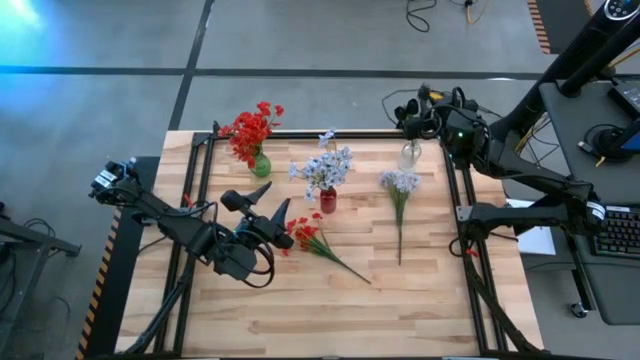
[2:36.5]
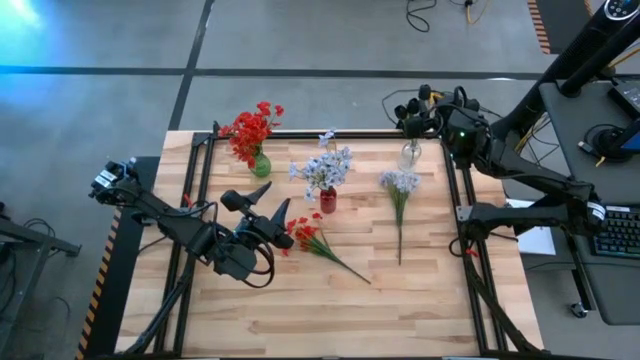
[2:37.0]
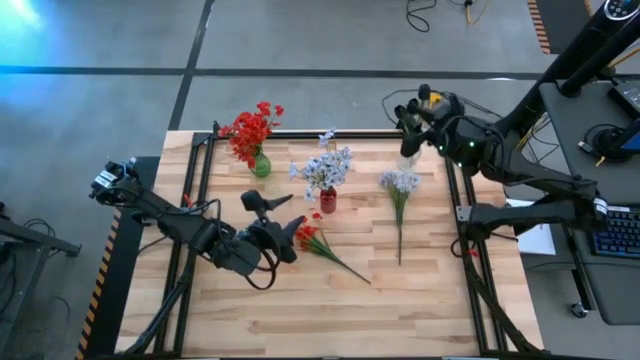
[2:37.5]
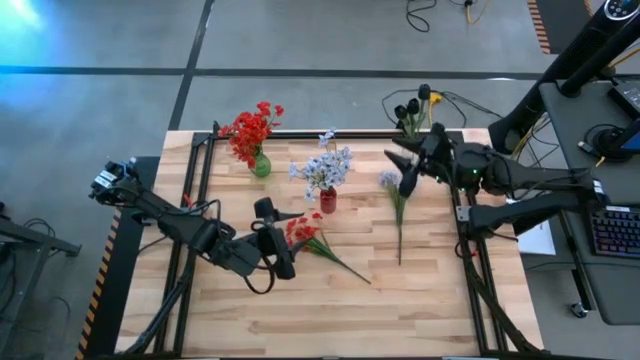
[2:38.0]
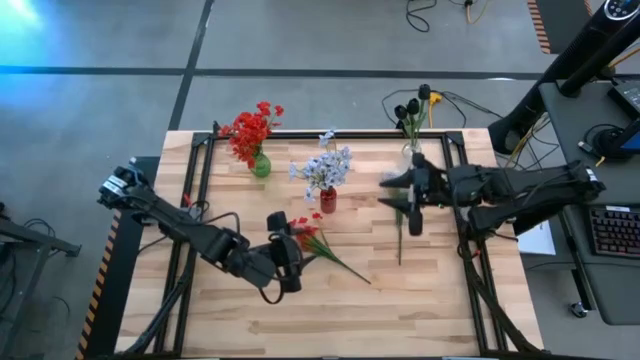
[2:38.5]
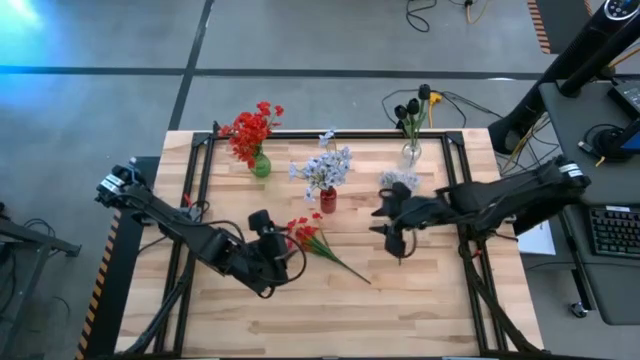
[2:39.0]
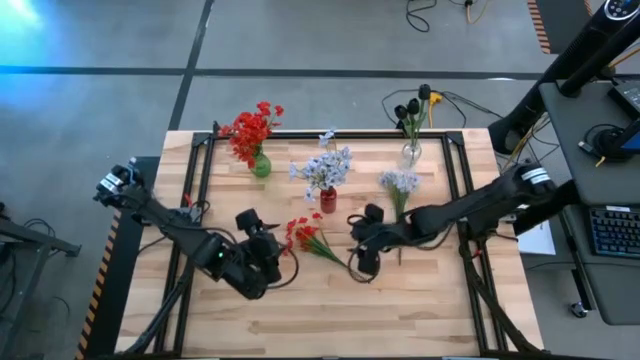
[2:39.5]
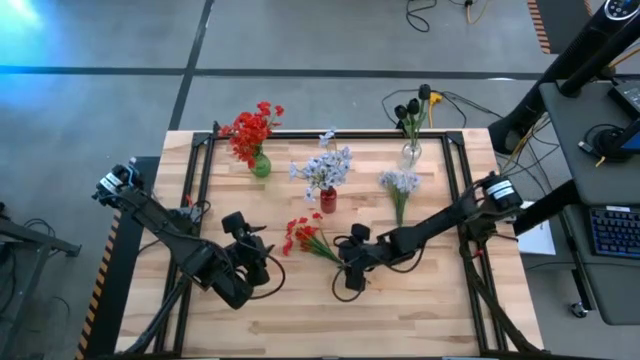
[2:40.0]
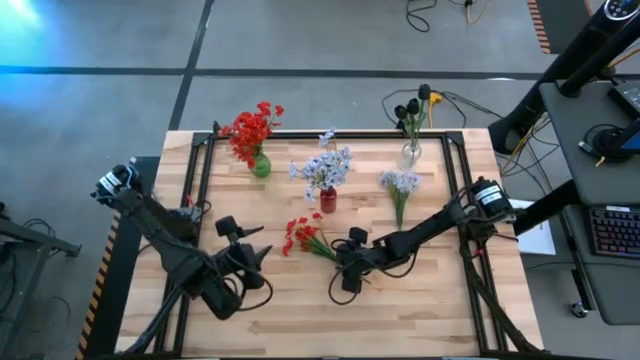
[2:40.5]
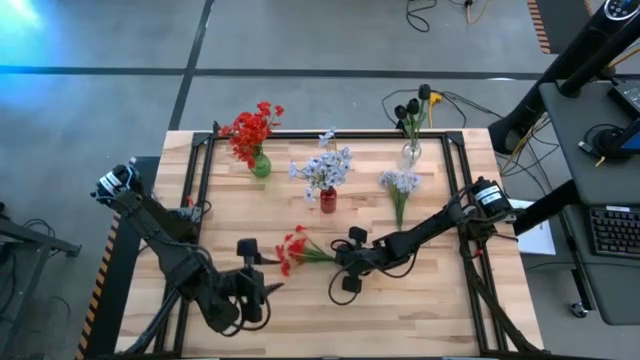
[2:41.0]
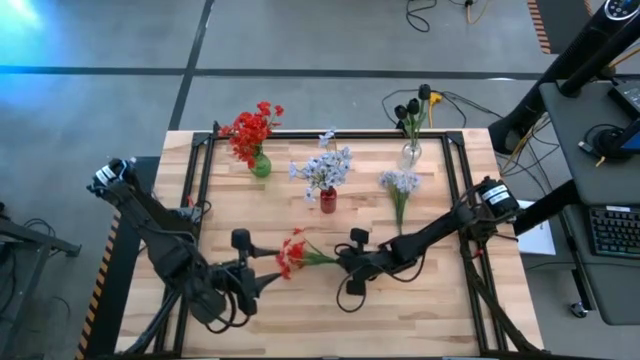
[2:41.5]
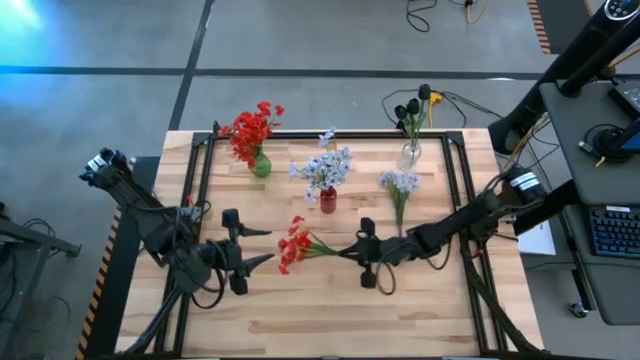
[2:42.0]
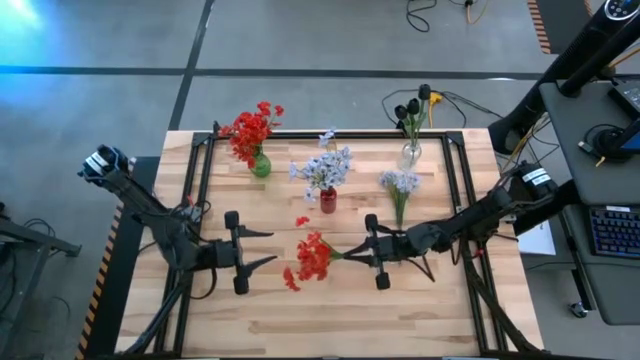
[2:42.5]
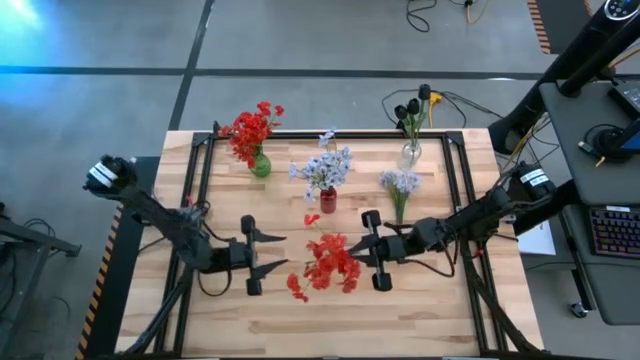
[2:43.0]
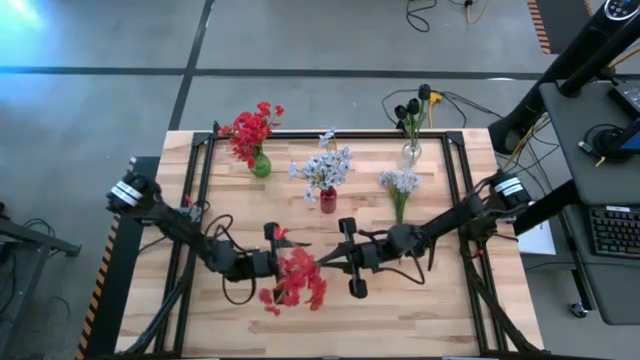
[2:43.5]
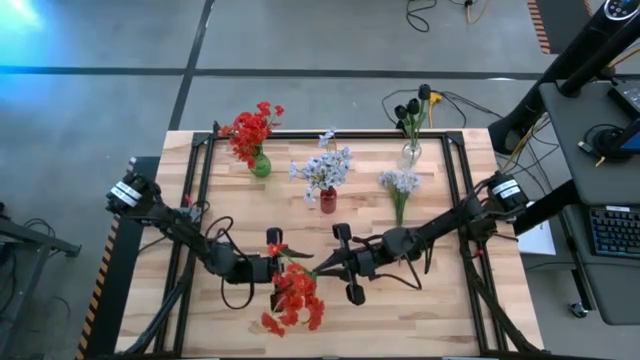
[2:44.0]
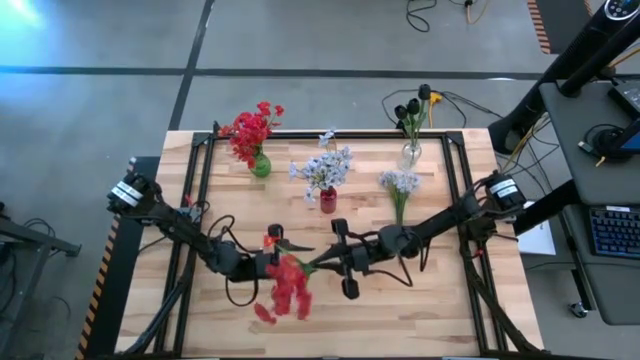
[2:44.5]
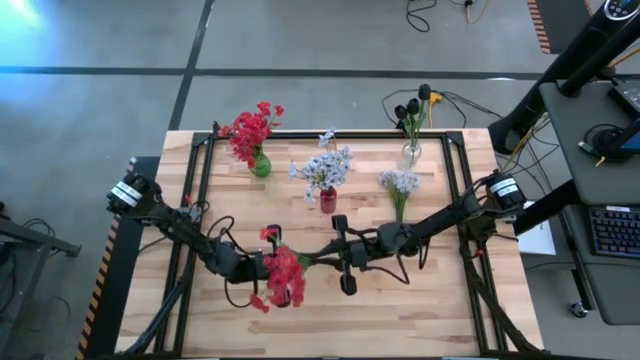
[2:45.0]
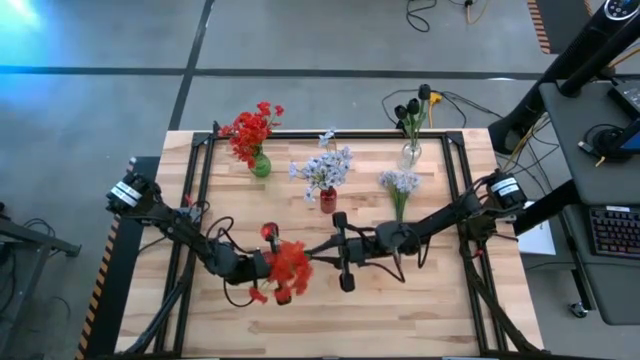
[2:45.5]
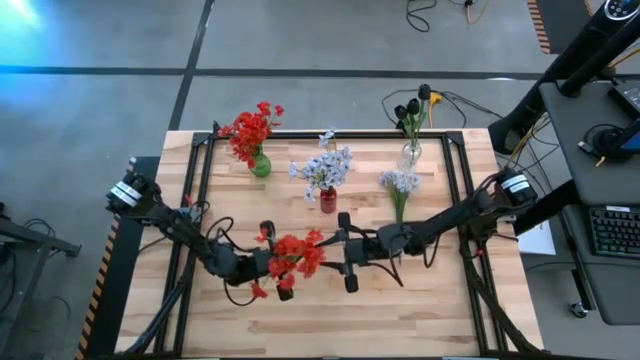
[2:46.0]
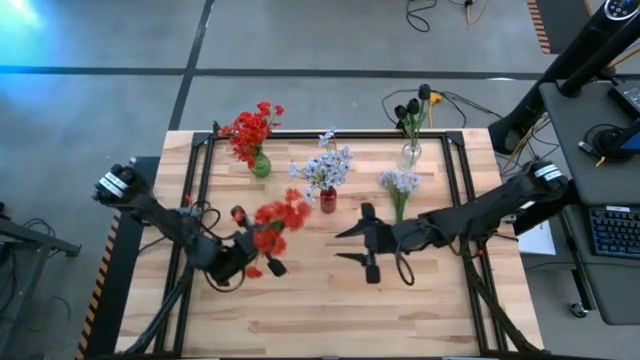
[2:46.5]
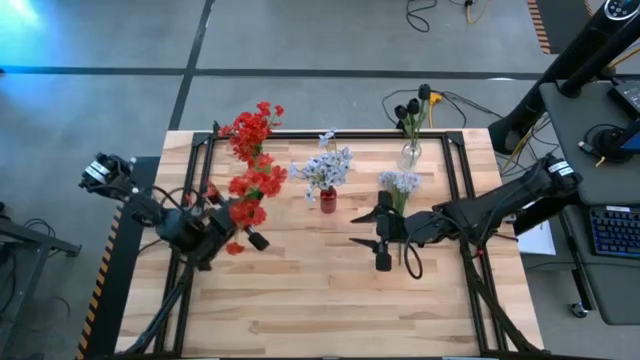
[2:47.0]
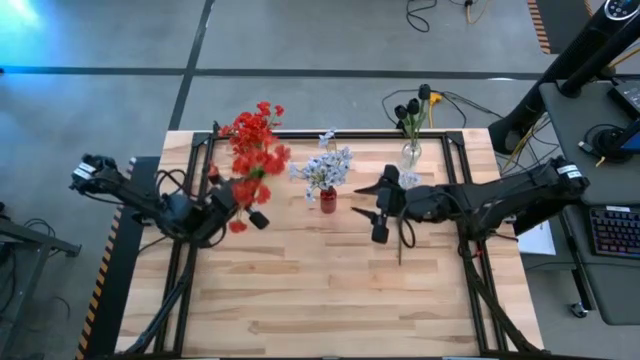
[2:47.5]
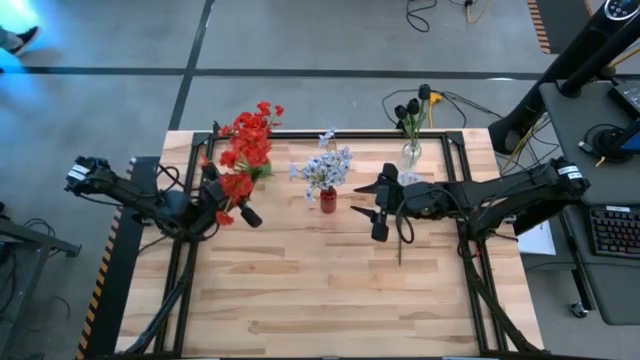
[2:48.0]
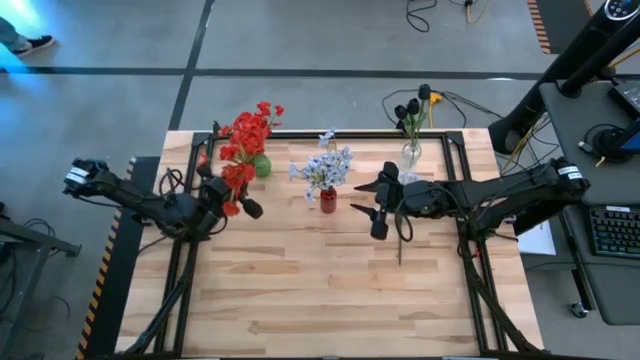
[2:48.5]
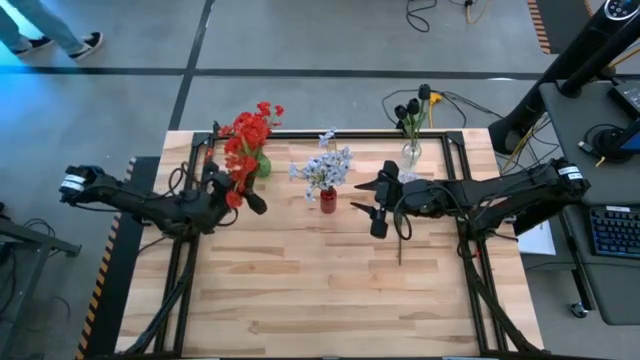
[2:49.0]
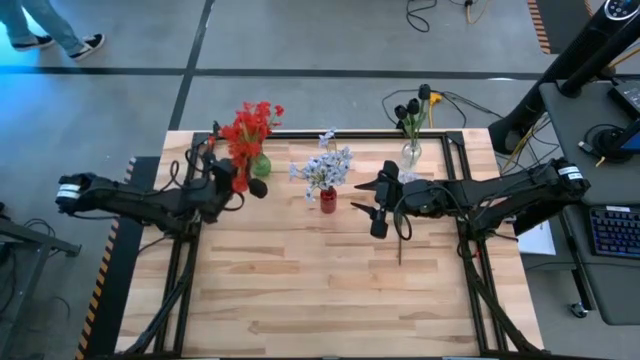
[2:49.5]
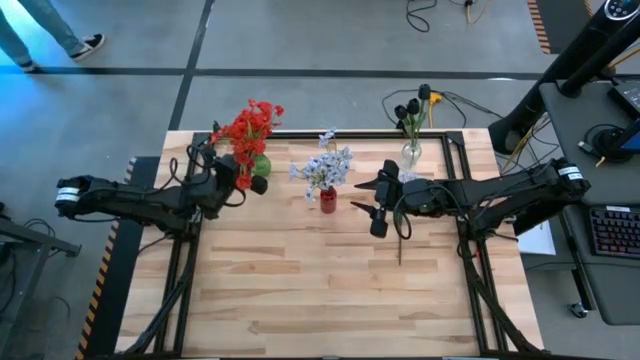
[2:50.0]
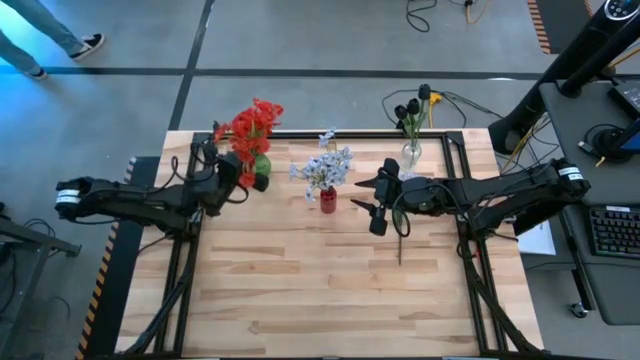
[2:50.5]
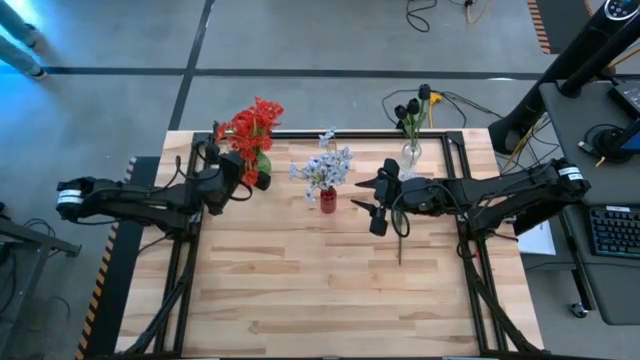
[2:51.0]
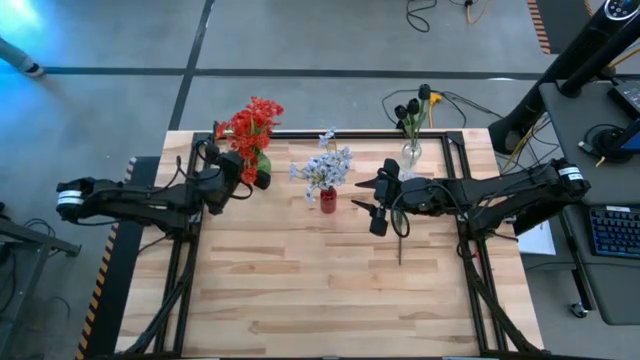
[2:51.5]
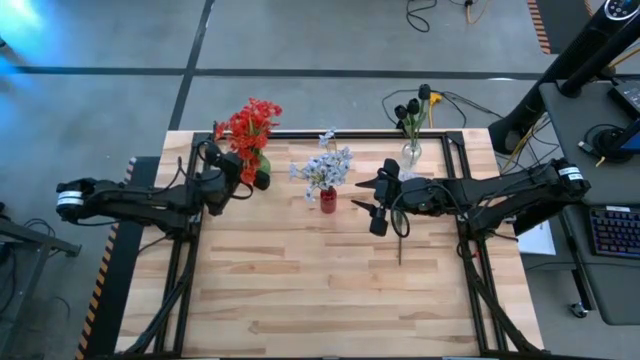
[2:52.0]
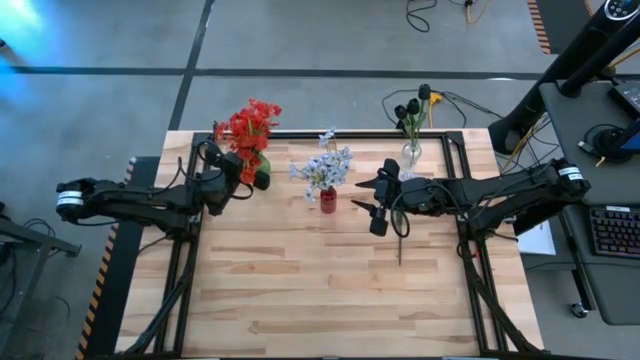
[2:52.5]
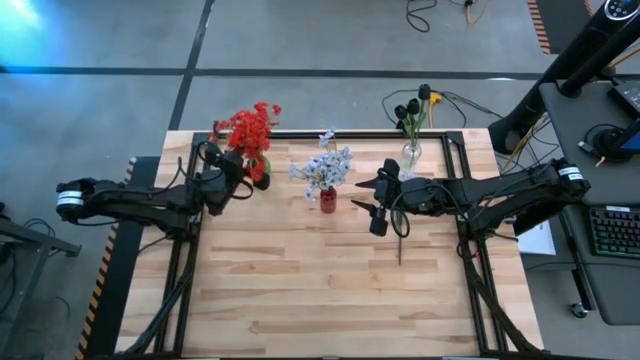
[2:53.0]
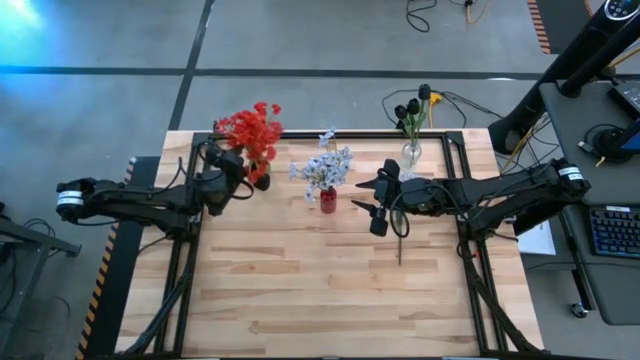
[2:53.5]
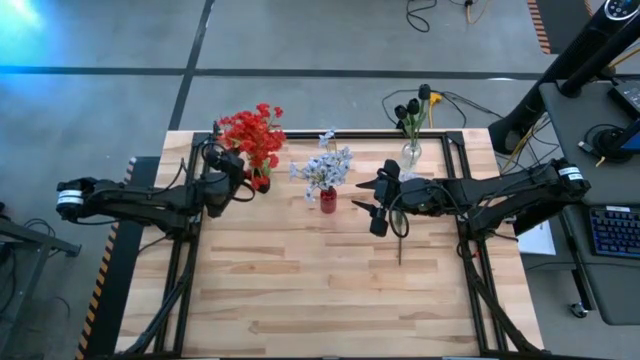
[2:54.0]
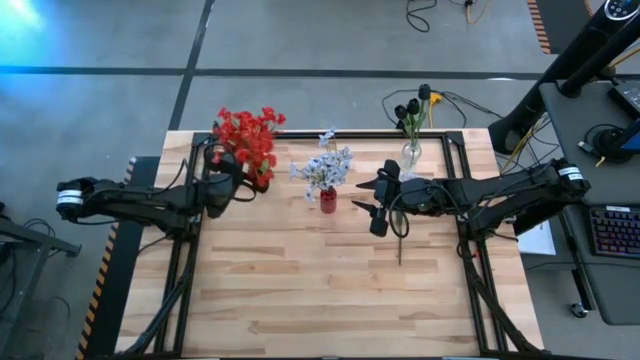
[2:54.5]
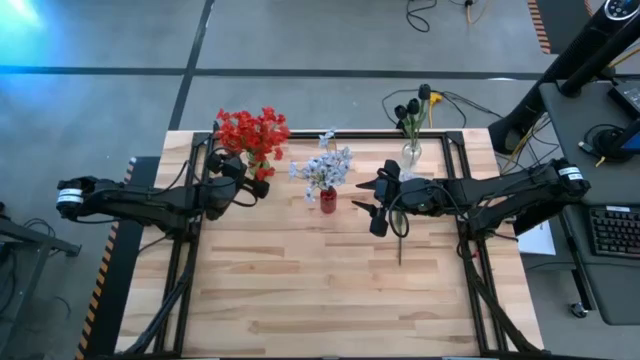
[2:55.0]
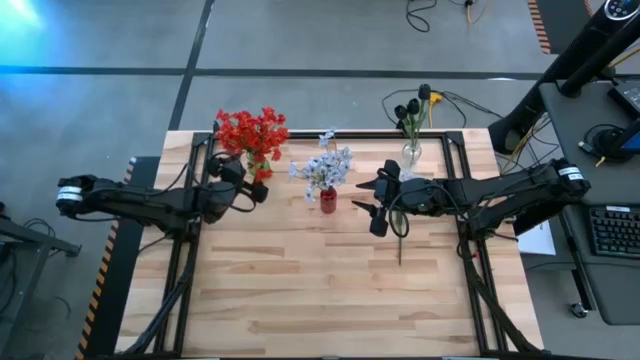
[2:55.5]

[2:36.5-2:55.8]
Task: Sort flowers into vase by color
Put the red flowers into the green vase

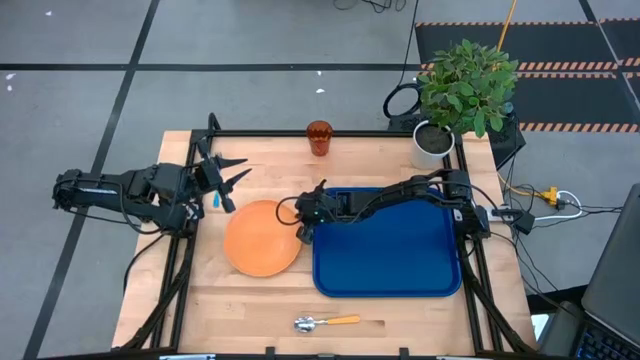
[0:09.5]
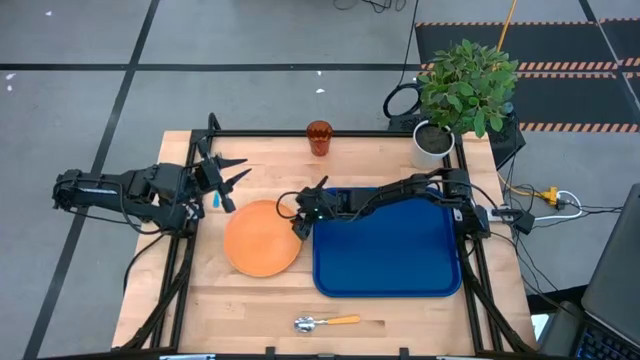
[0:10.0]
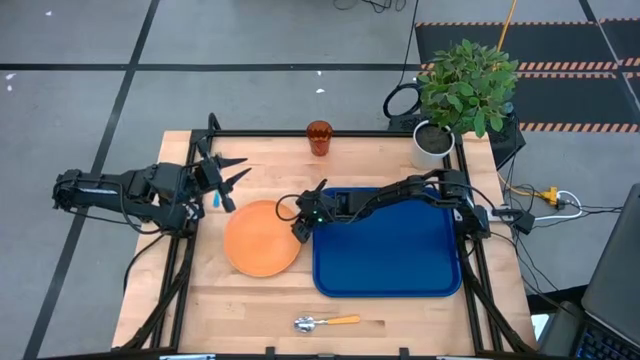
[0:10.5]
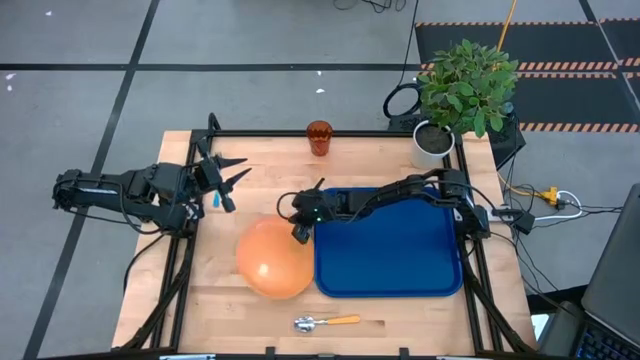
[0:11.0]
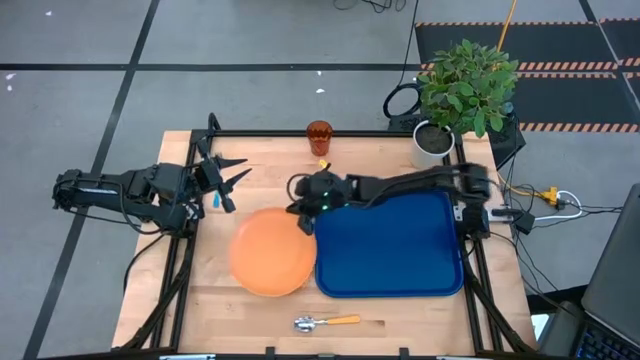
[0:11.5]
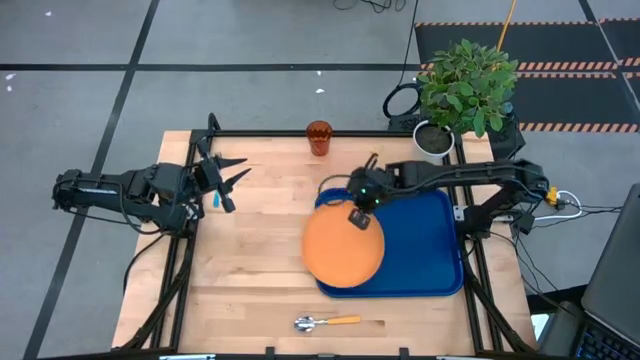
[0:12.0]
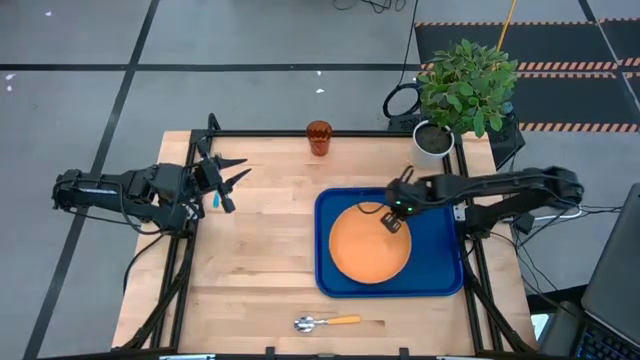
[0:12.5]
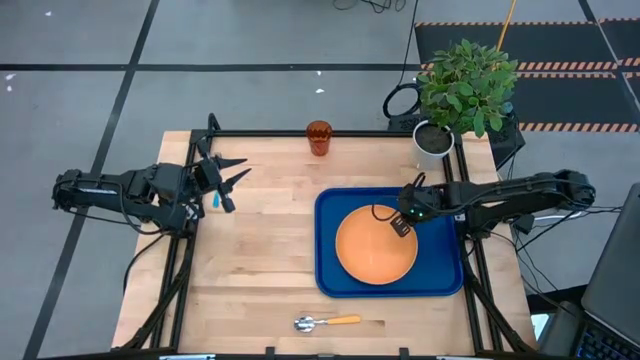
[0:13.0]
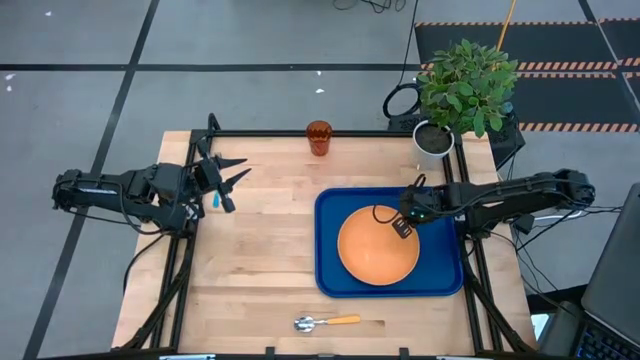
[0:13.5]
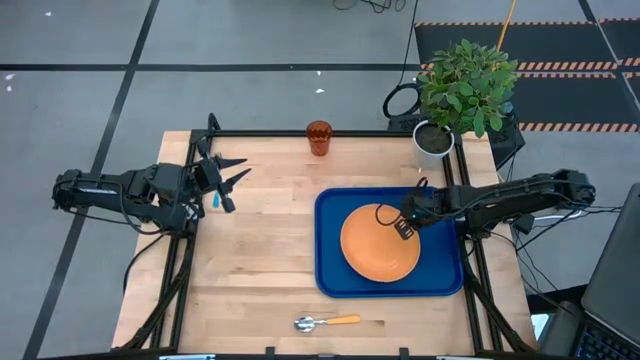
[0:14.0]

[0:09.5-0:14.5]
Task: Pick and place plate/cup/fork/spoon on tray
Put the orange plate on the middle of the blue serving tray
